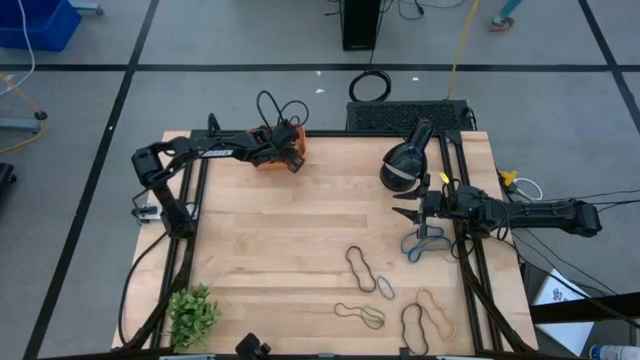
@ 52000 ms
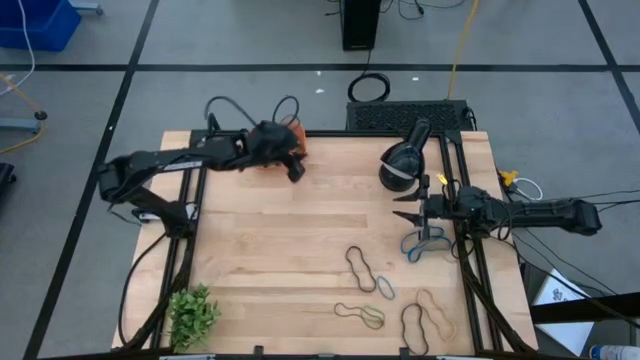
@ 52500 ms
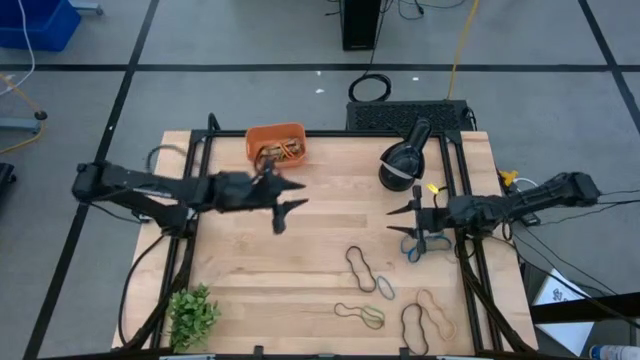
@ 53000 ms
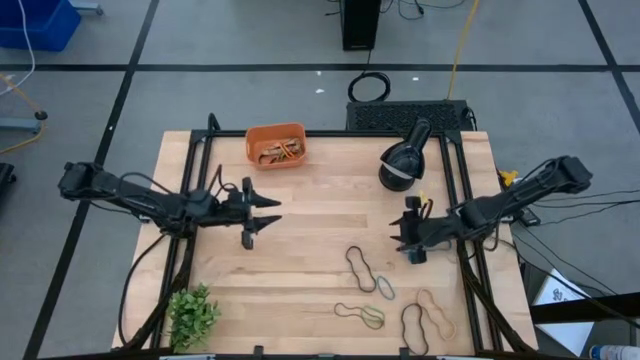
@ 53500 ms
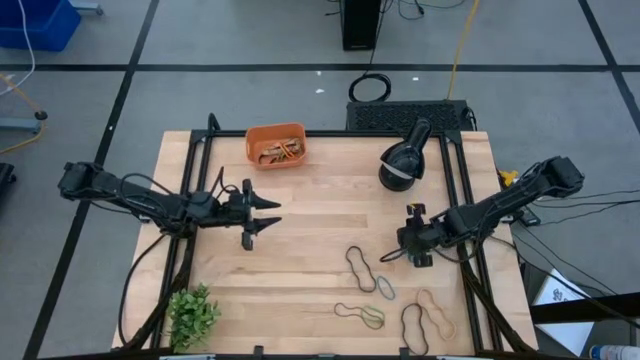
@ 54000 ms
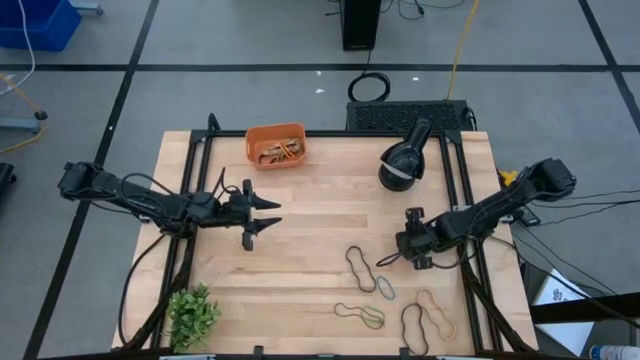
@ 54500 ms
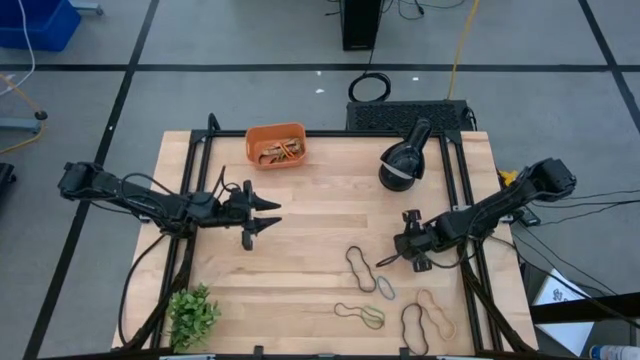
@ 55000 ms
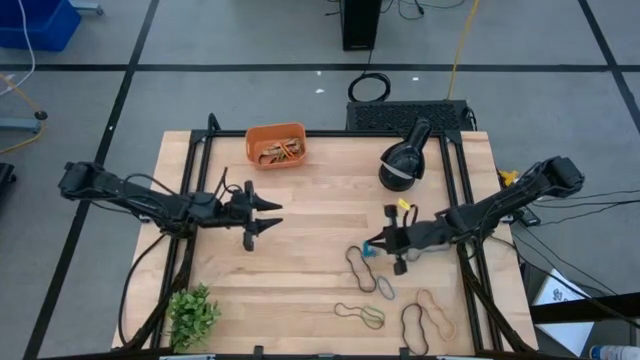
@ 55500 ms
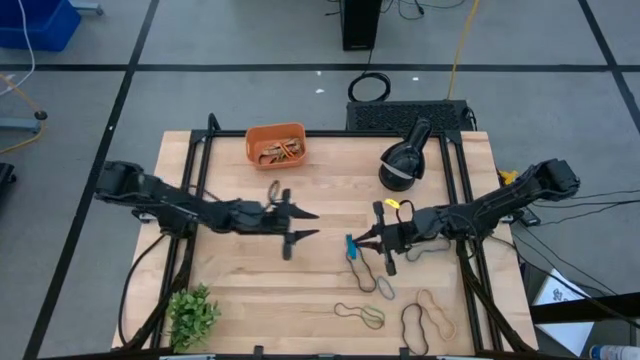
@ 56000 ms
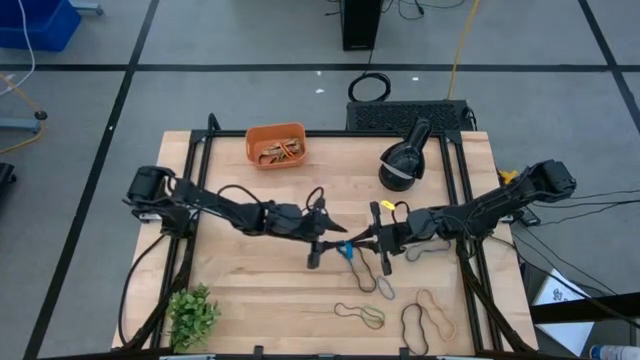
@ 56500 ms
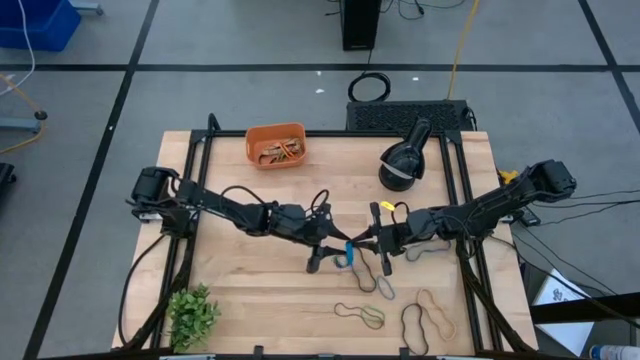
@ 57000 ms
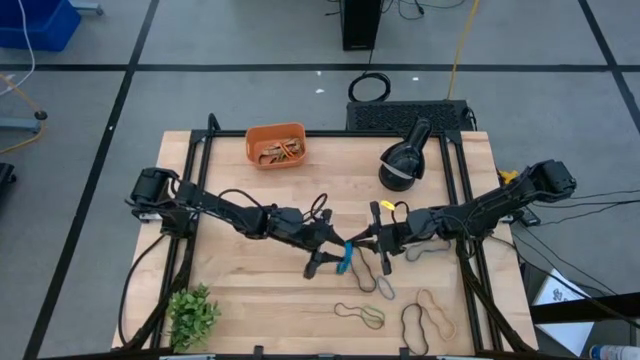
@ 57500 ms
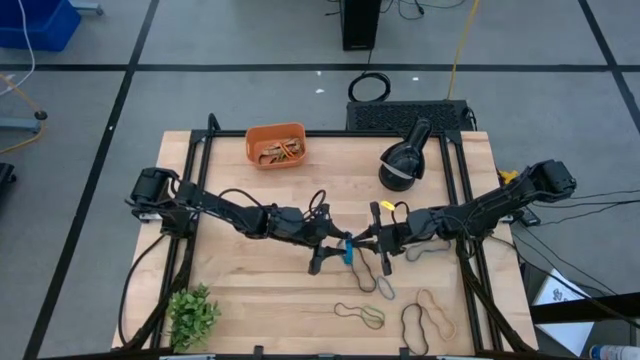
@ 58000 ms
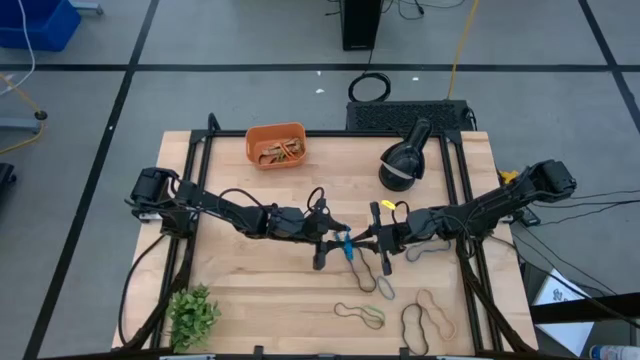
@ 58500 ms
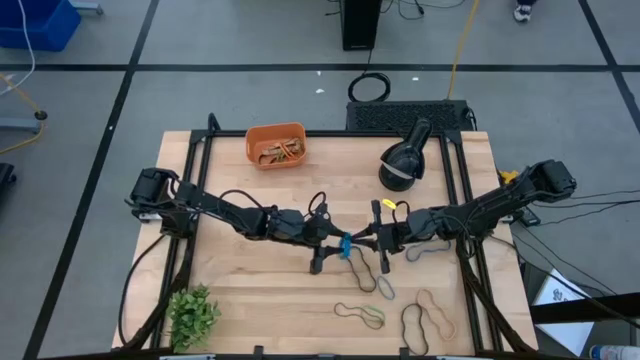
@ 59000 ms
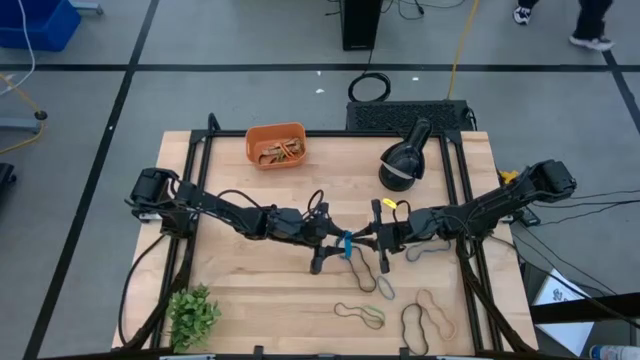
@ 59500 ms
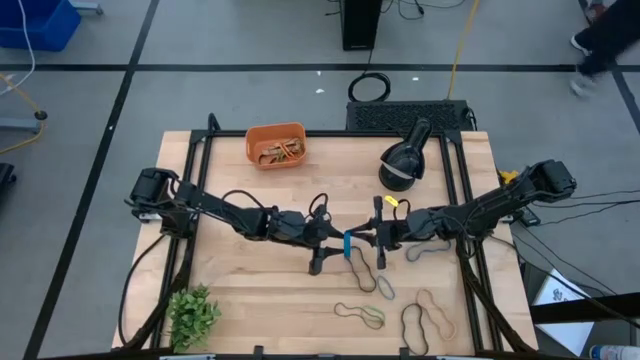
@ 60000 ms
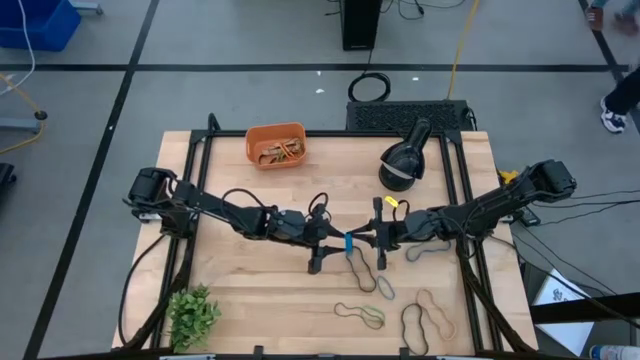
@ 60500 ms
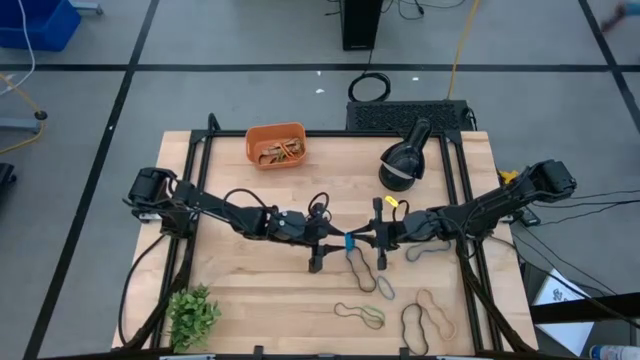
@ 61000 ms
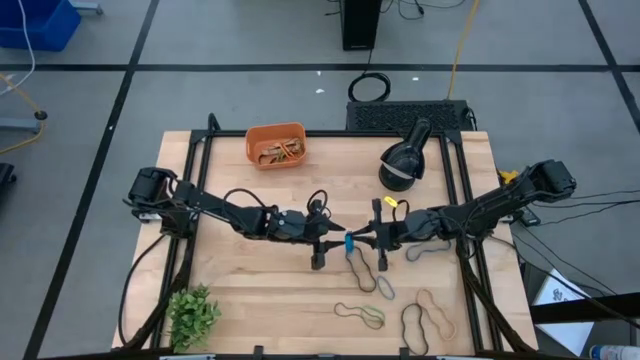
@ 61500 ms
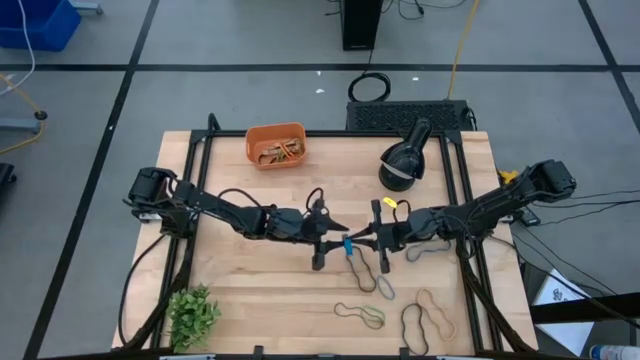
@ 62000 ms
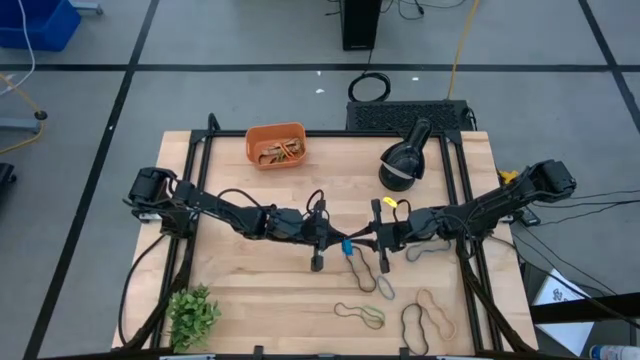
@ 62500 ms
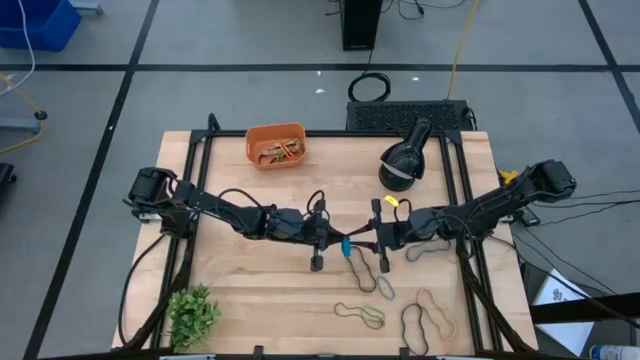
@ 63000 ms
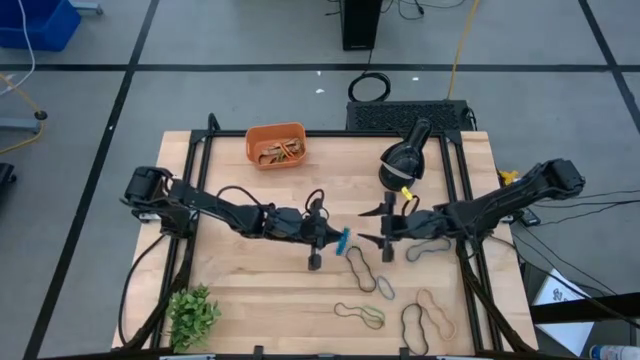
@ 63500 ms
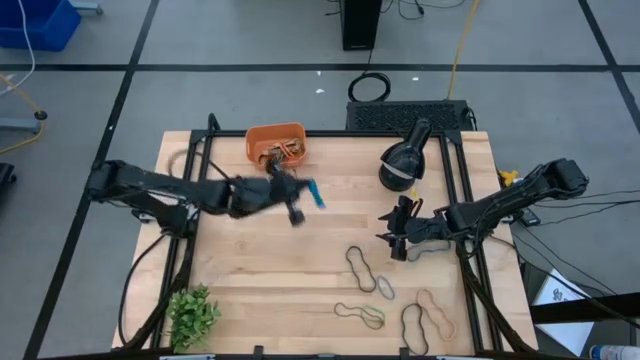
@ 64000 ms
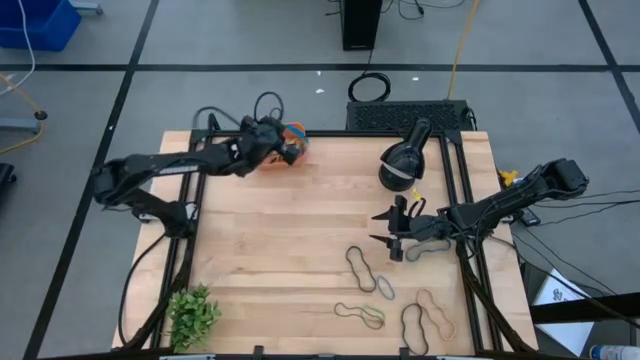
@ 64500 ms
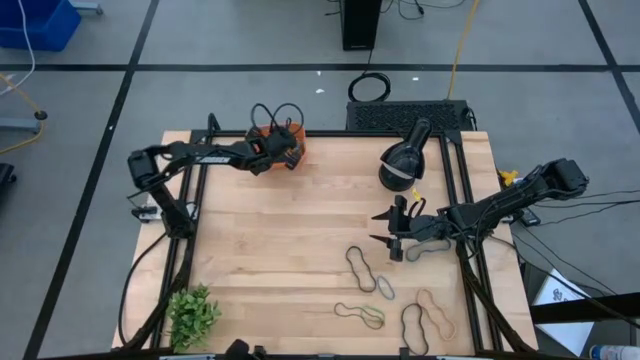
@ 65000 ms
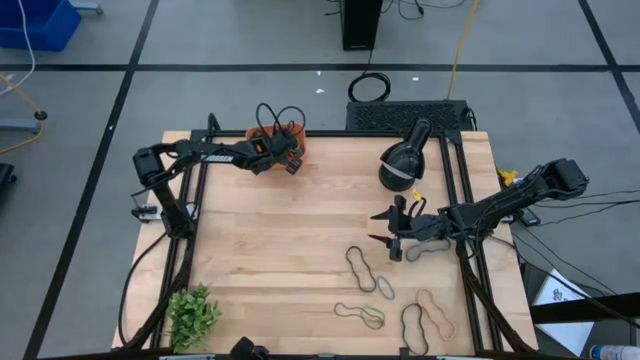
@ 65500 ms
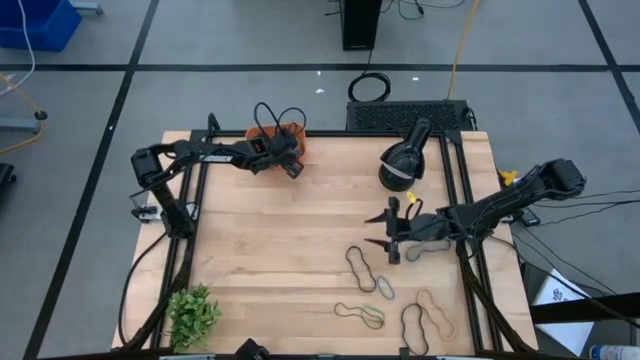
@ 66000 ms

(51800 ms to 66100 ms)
Task: Pick and place rubber bands into bin
Put the top blue rubber band into the orange container

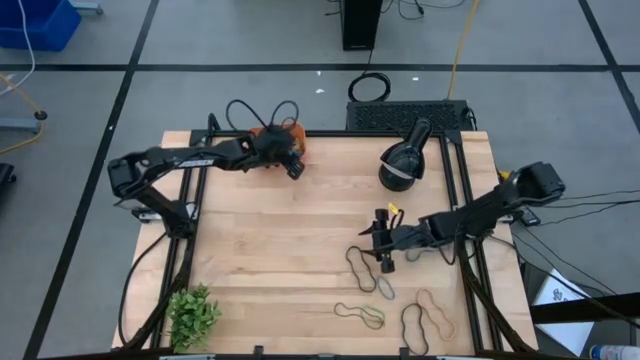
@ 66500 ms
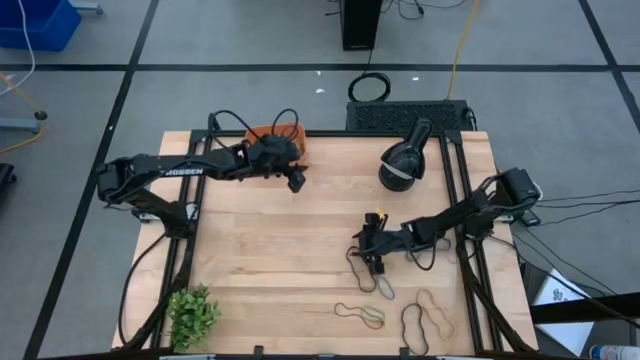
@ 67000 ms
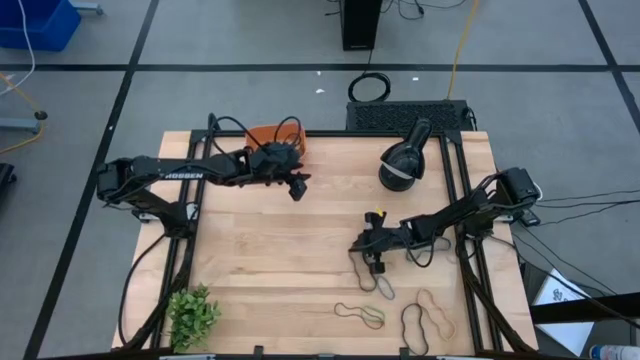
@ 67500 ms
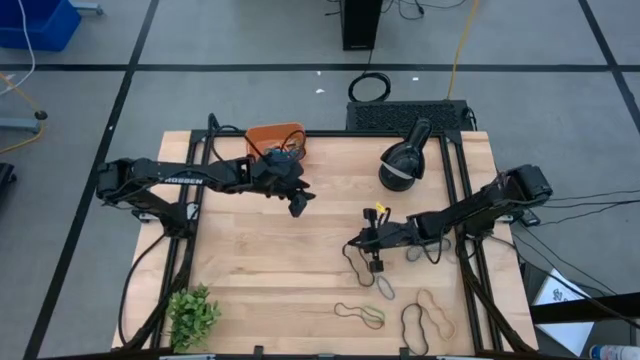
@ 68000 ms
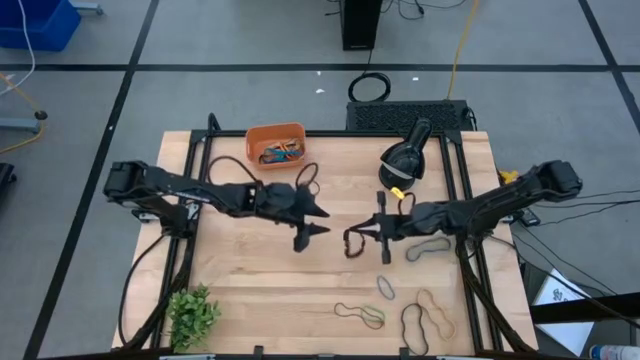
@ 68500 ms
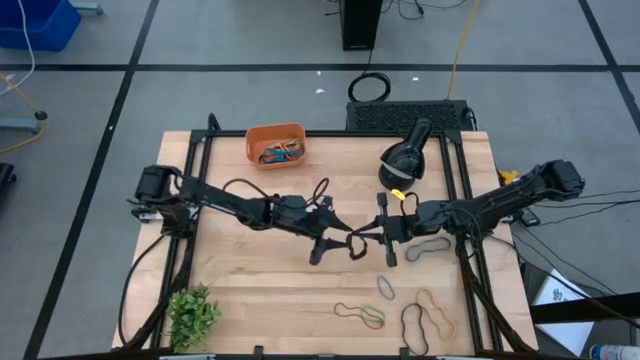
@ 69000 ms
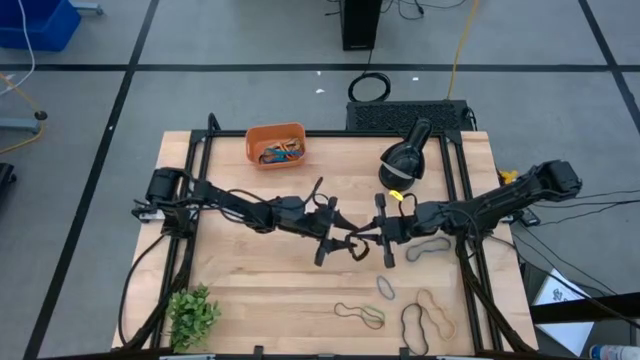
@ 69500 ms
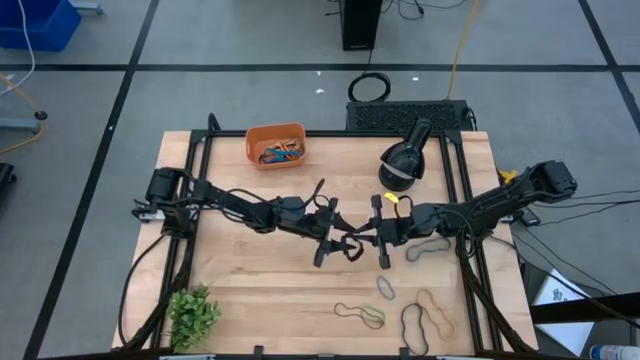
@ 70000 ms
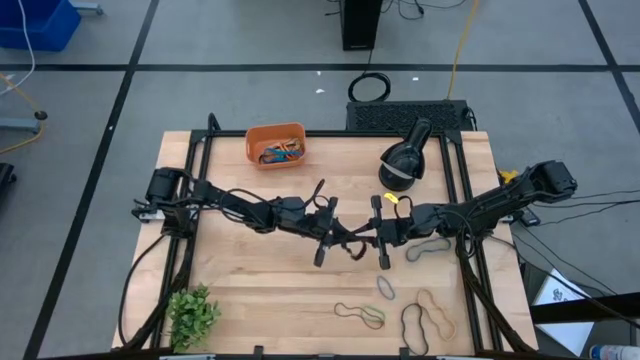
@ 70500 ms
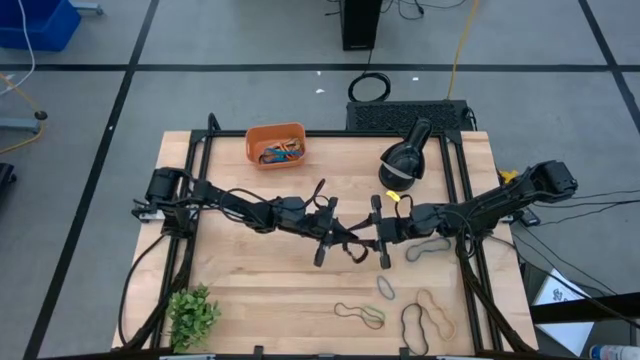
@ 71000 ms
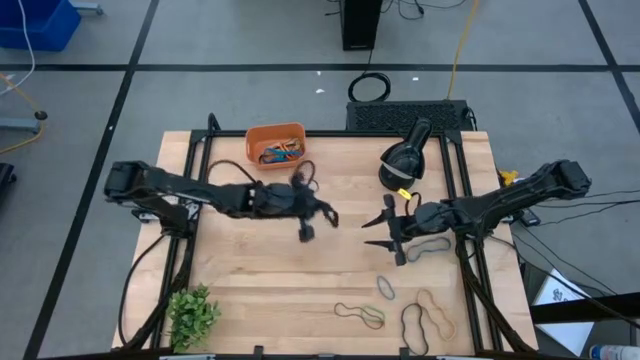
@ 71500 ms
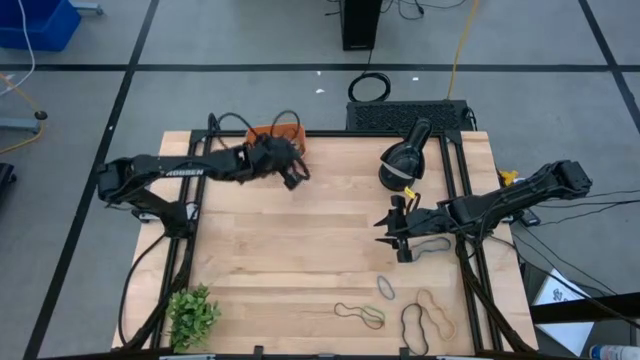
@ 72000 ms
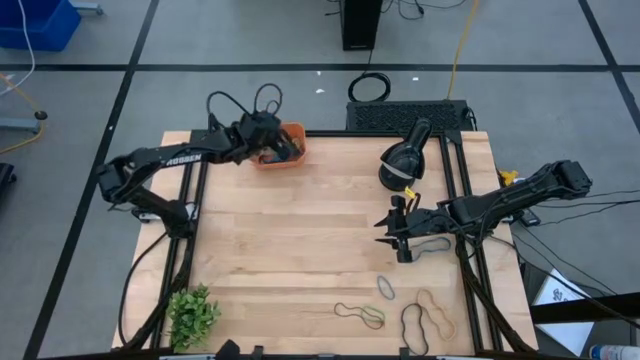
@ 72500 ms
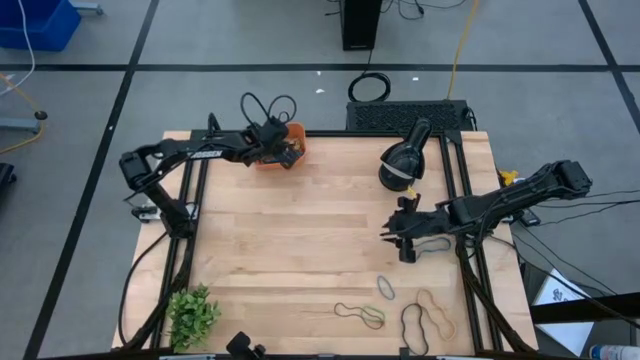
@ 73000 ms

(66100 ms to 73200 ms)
Put the top black rubber band into the orange container
